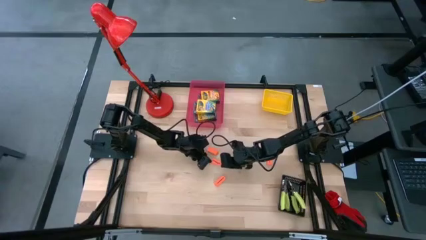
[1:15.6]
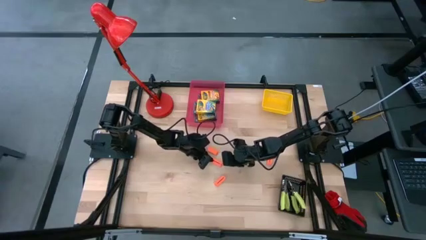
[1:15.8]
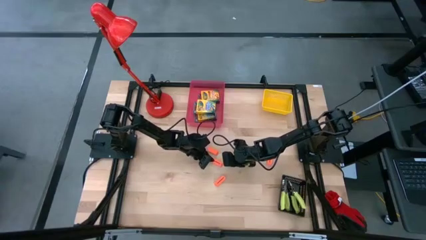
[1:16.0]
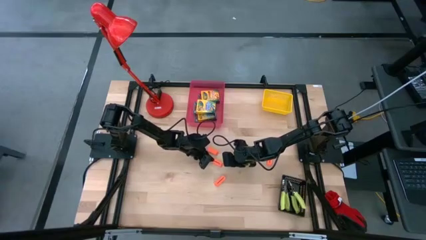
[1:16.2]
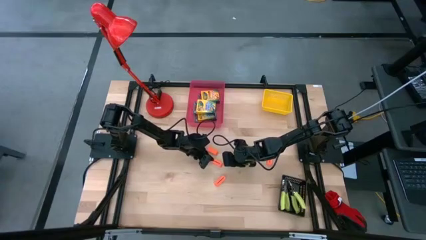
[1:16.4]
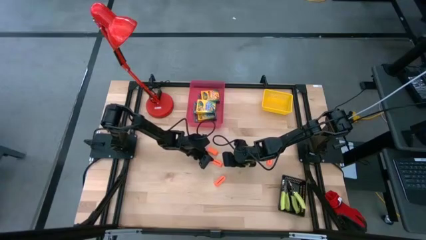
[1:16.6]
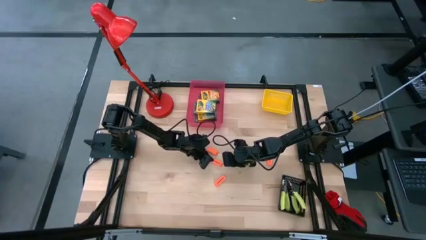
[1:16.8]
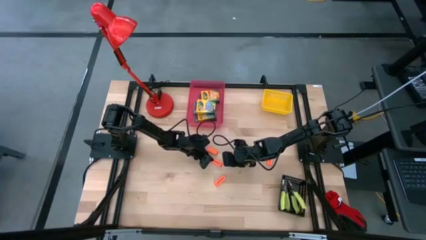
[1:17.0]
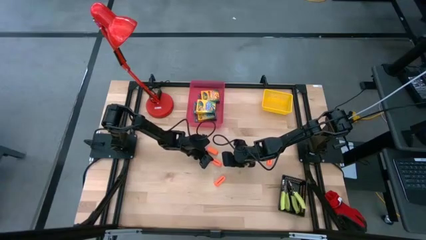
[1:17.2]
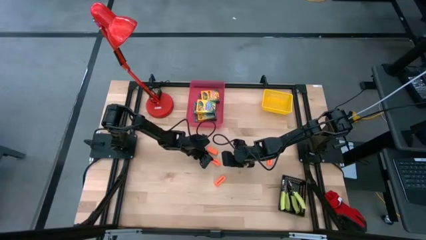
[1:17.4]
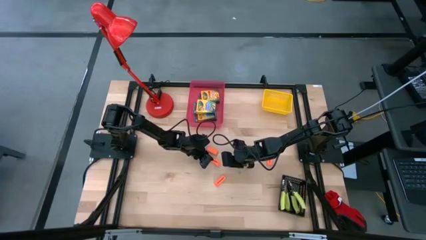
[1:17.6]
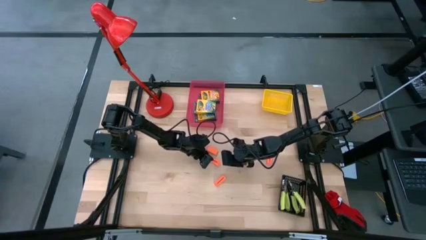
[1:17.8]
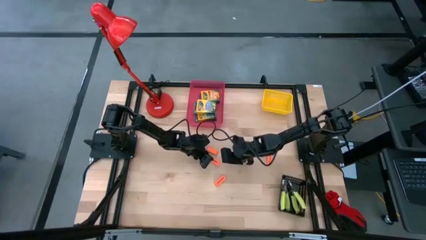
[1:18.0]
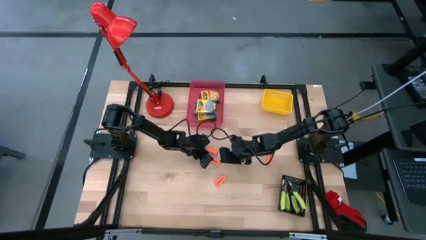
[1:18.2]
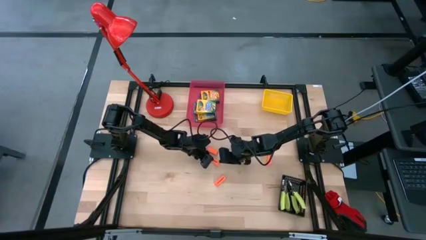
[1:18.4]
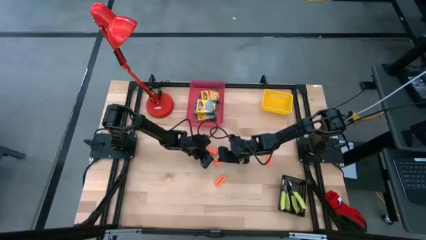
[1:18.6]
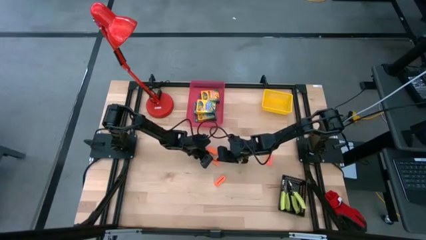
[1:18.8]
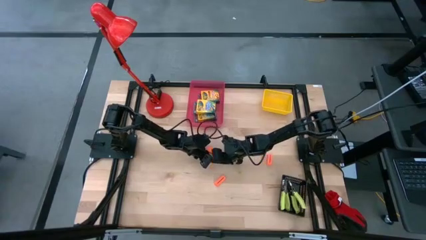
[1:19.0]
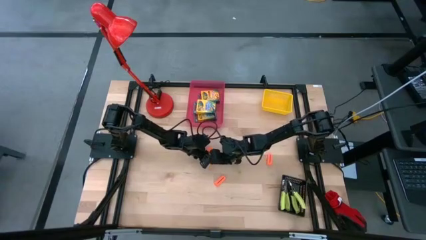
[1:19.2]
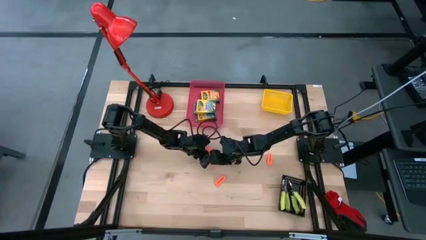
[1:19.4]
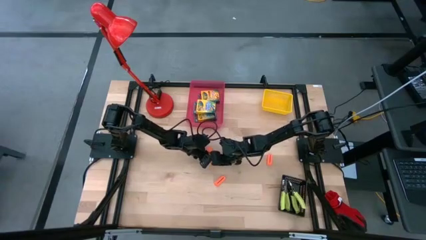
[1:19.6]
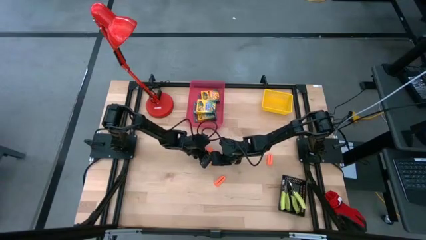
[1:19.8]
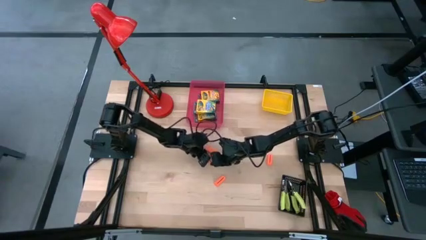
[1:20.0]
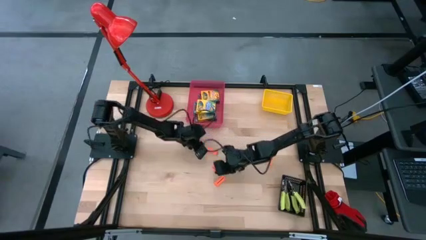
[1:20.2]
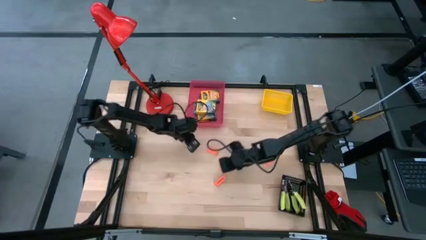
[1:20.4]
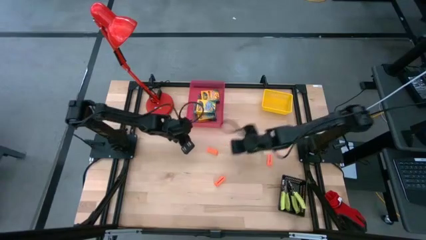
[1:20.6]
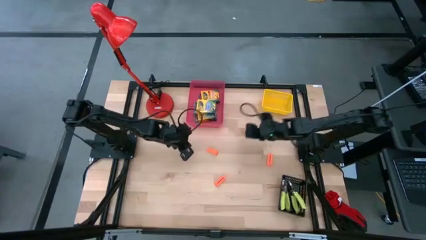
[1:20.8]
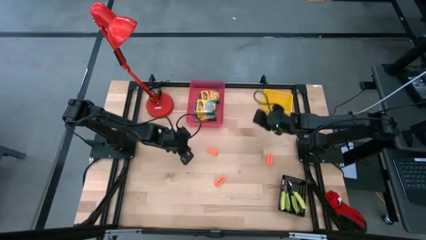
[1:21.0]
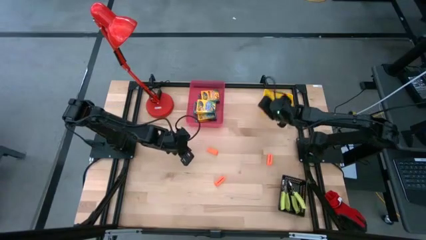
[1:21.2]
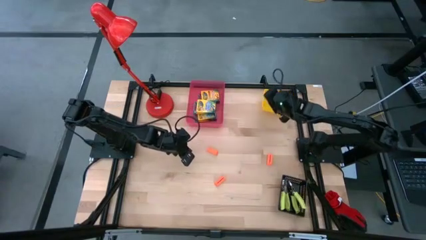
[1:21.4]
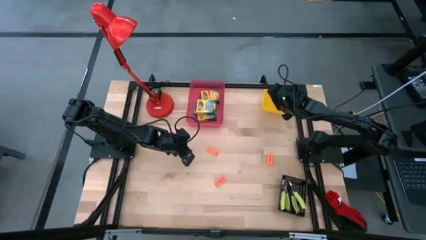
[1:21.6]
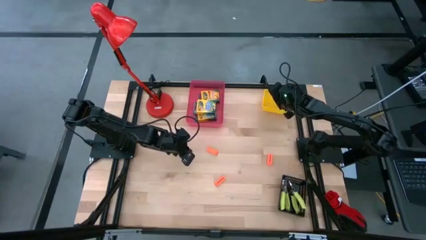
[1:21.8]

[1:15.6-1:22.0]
Task: Pick & Place School Supplies
Put the orange eraser into the yellow bin

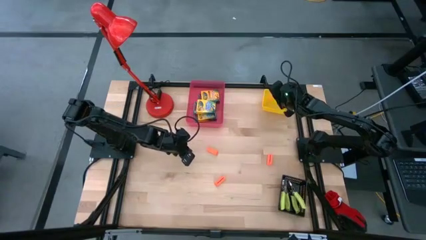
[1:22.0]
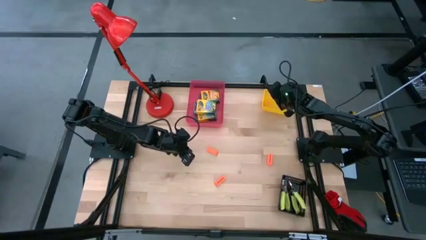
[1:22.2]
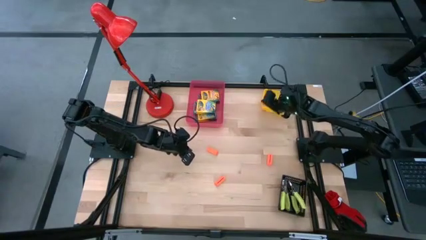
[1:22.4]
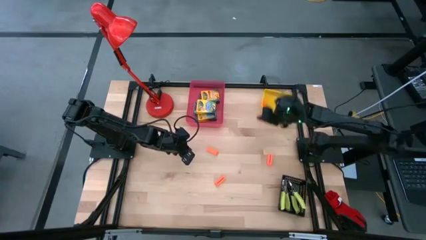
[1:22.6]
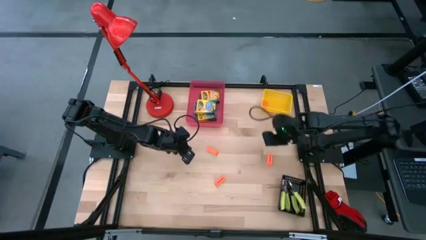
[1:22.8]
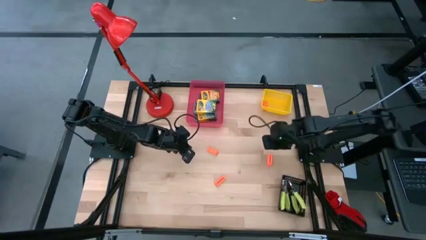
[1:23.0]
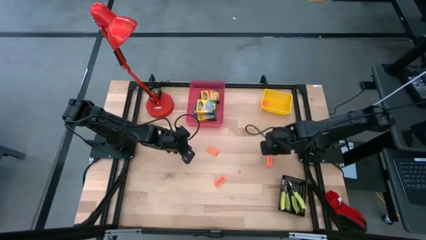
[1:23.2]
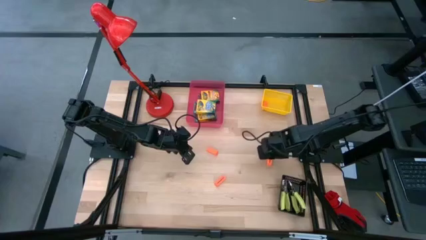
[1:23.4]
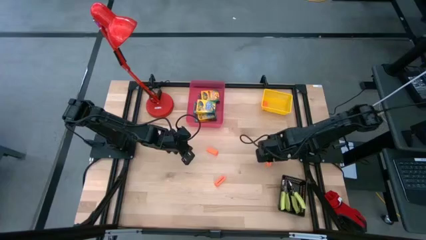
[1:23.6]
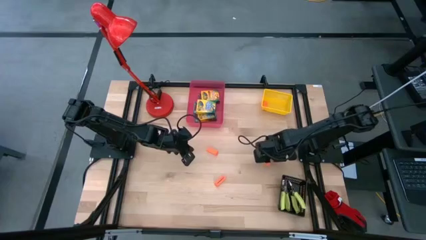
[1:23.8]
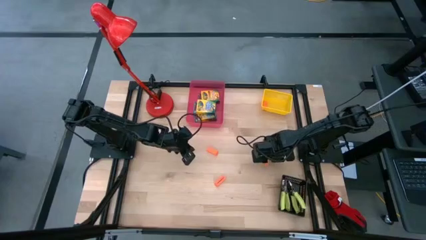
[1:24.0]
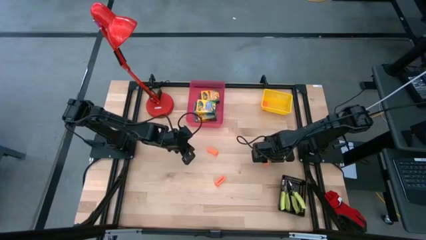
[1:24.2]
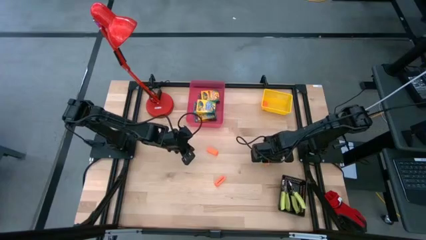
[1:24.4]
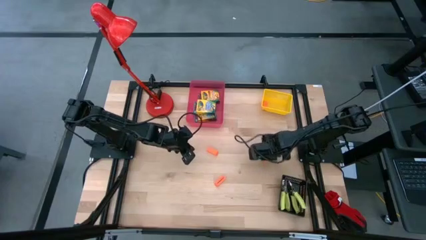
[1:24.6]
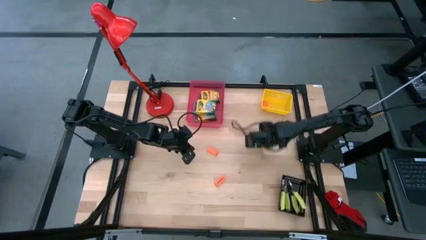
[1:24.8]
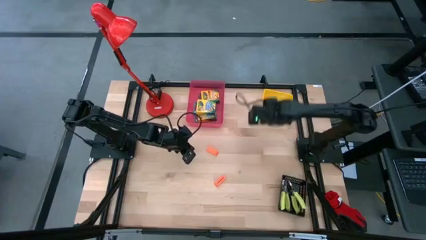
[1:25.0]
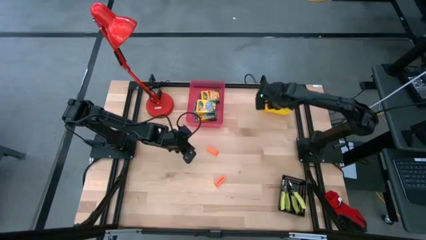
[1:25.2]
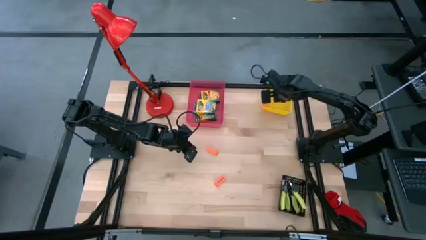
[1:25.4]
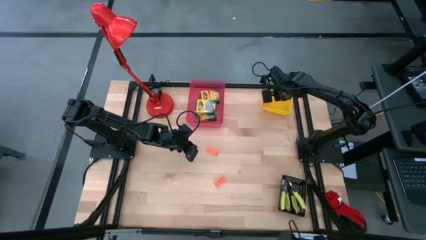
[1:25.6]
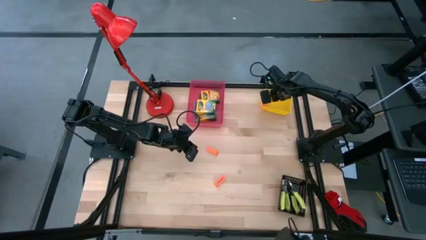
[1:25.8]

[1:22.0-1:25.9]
Put the orange eraser into the yellow bin

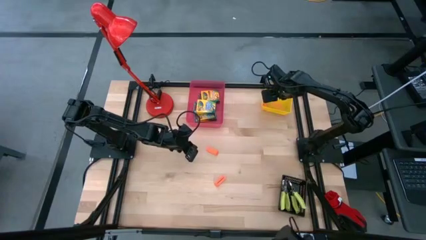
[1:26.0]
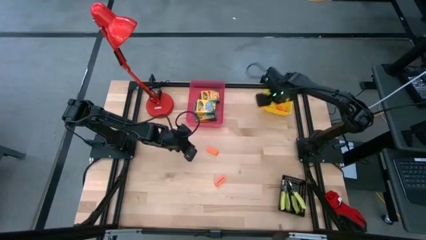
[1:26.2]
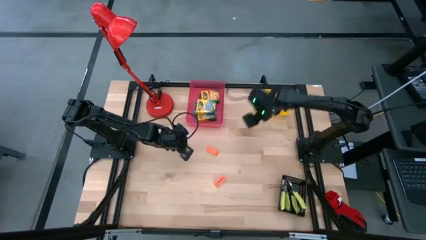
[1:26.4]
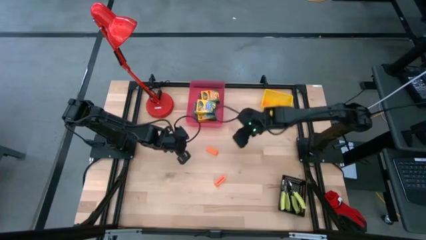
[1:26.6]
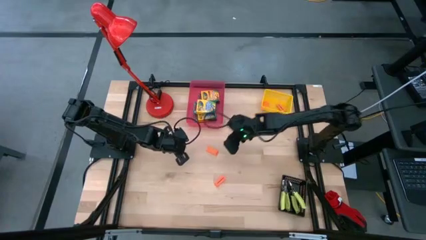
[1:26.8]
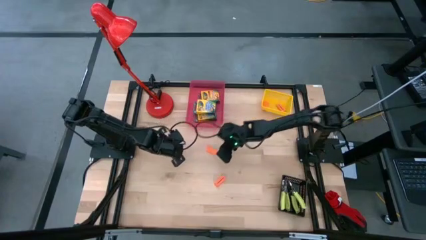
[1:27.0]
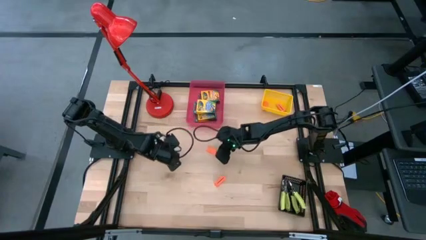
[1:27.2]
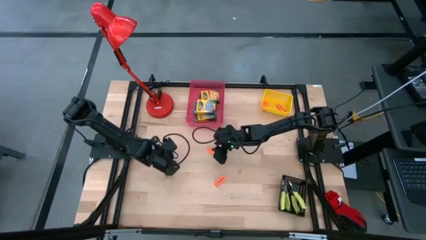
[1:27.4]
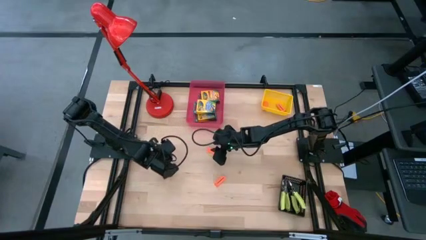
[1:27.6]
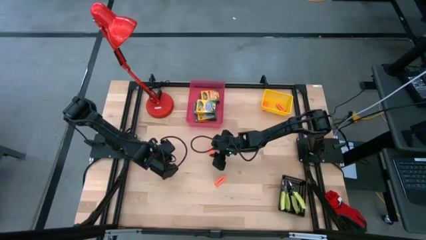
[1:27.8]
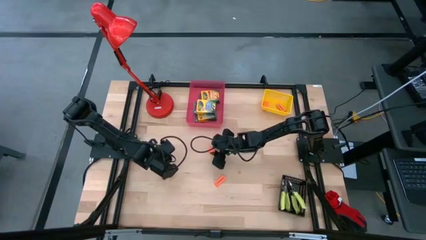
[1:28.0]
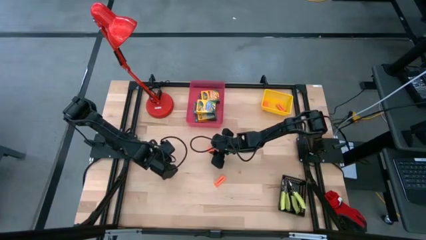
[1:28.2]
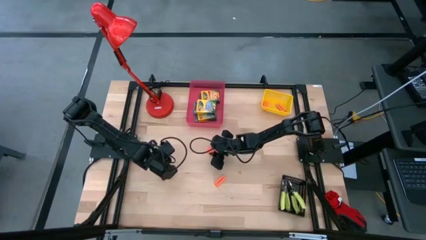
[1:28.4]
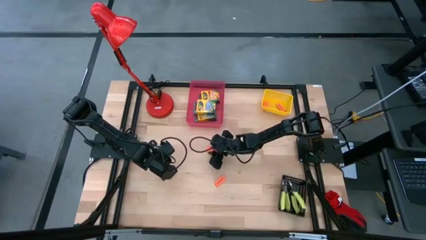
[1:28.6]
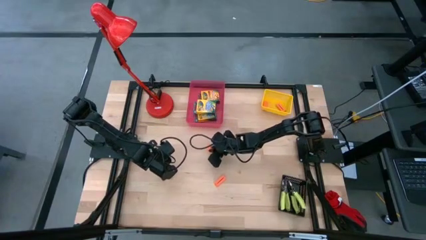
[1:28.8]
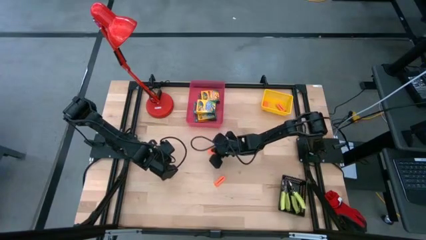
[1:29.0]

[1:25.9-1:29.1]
Put the orange eraser into the yellow bin

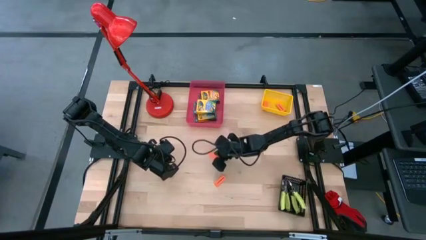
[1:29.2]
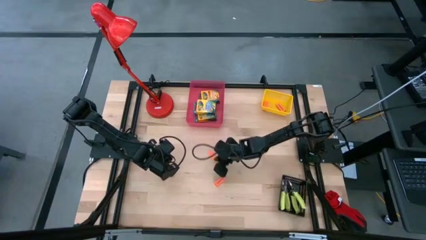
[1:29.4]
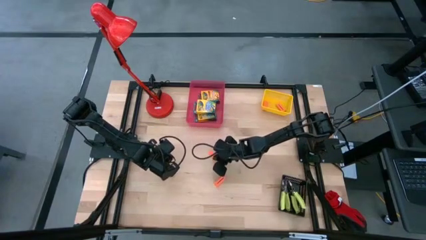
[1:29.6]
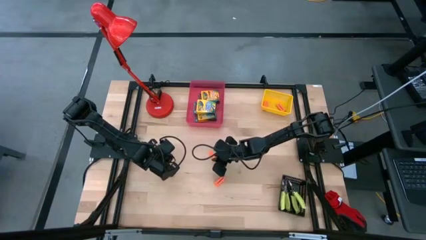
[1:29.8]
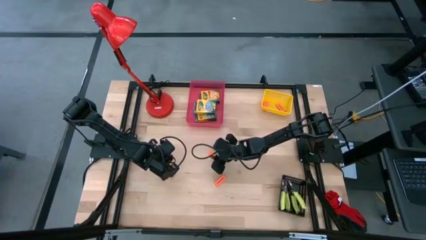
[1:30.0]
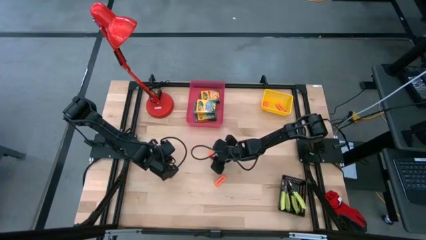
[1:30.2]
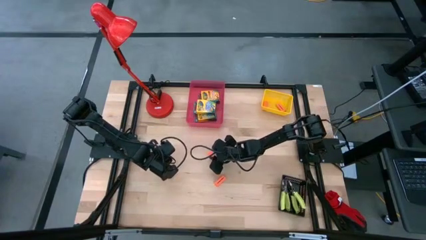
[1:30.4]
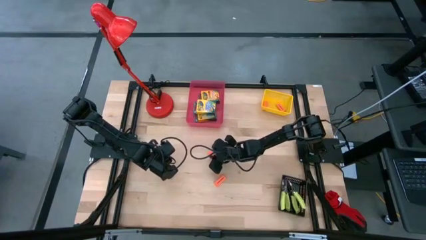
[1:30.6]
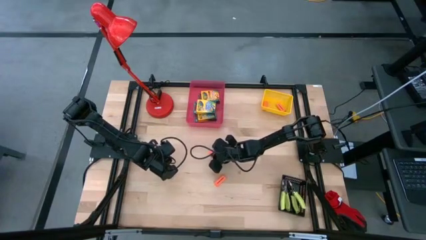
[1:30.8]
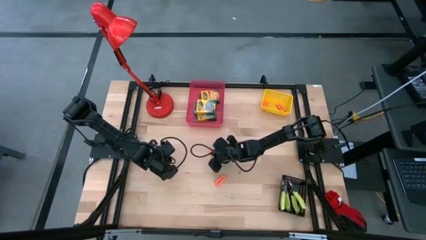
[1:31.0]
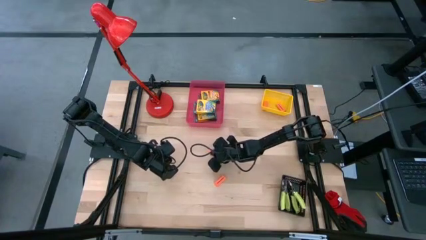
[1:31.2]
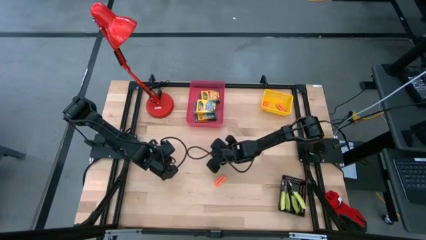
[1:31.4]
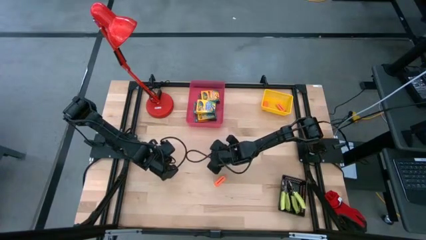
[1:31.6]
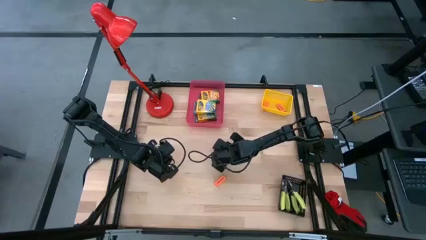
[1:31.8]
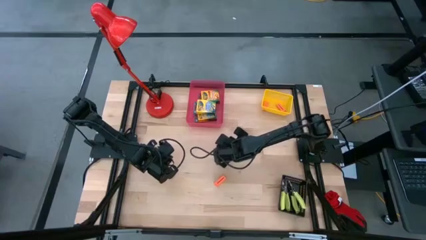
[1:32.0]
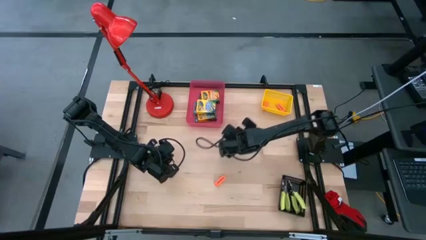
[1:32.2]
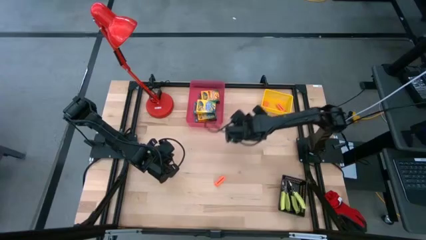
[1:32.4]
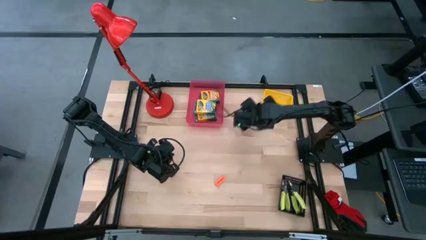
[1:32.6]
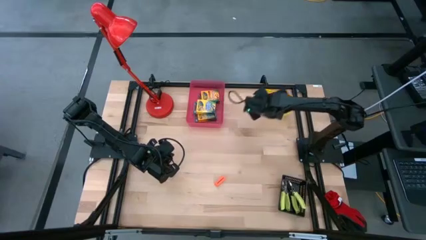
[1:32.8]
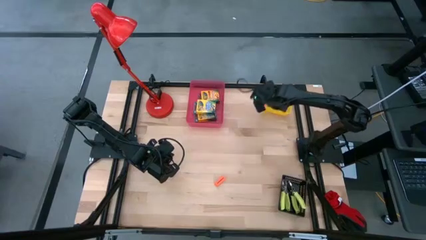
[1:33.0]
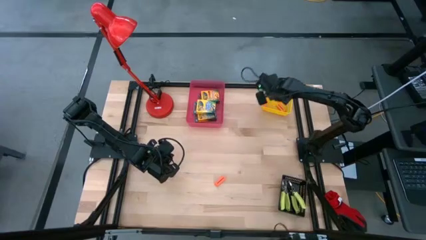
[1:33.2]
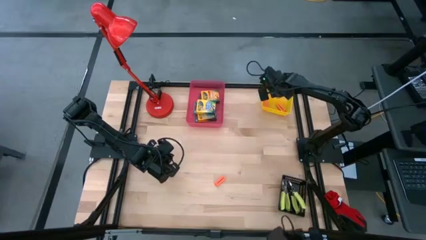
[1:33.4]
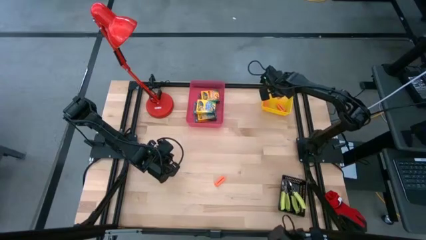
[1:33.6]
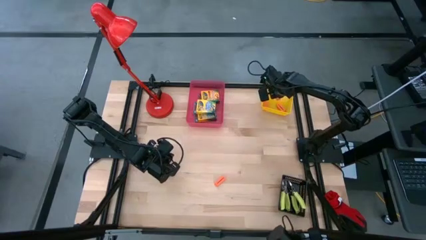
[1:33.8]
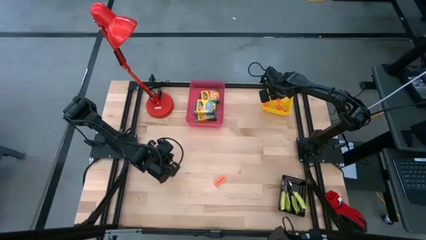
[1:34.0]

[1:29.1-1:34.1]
Put the orange eraser into the yellow bin
